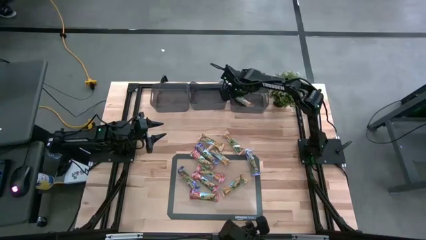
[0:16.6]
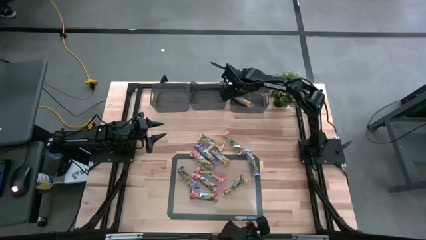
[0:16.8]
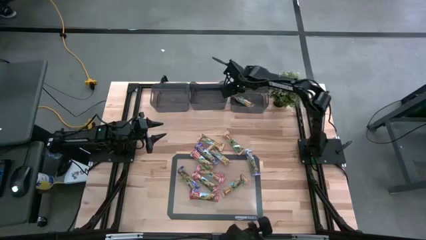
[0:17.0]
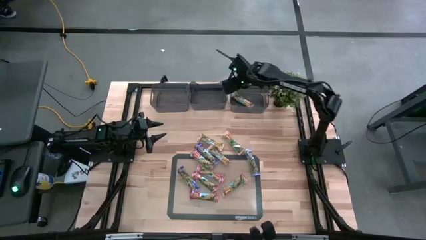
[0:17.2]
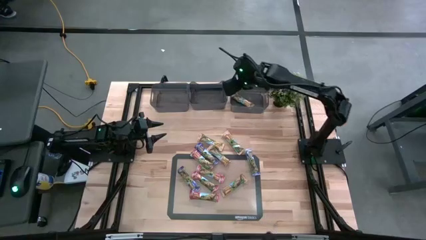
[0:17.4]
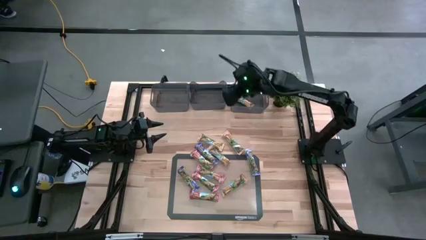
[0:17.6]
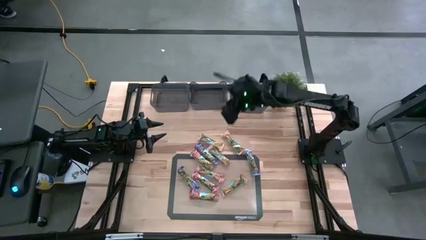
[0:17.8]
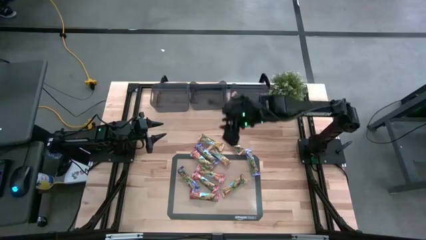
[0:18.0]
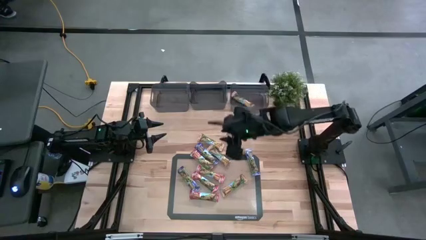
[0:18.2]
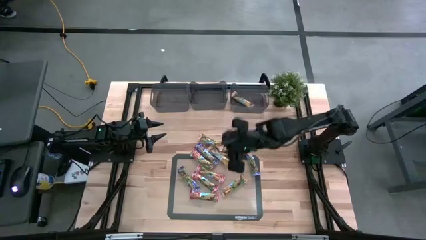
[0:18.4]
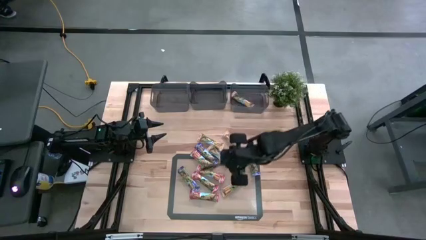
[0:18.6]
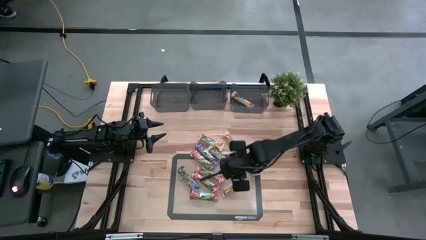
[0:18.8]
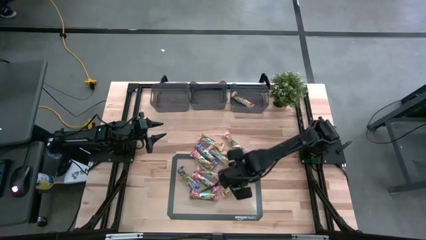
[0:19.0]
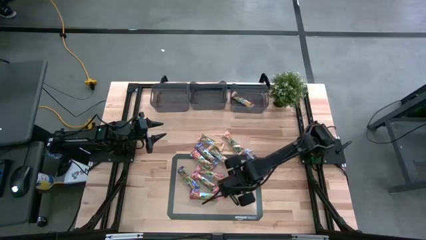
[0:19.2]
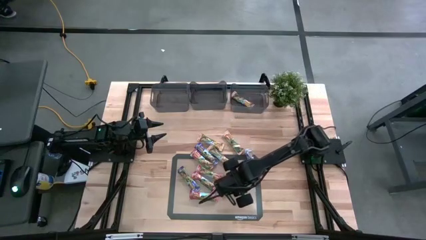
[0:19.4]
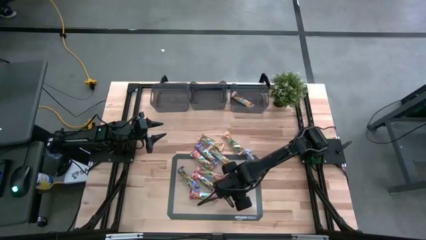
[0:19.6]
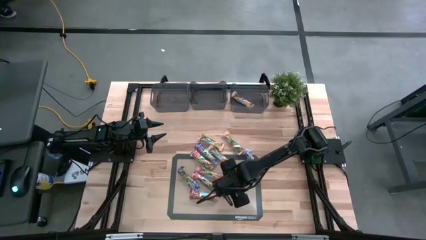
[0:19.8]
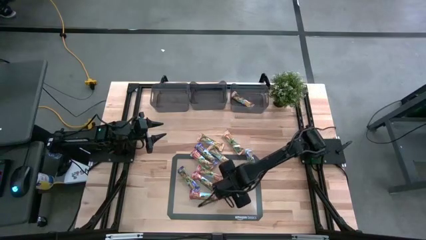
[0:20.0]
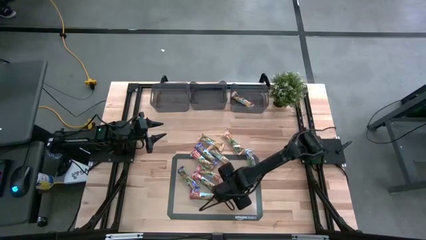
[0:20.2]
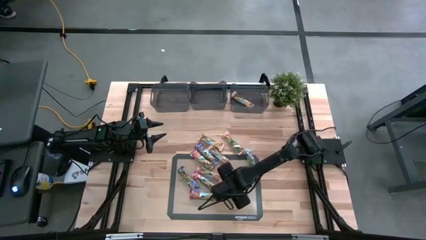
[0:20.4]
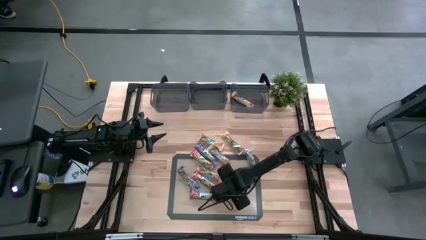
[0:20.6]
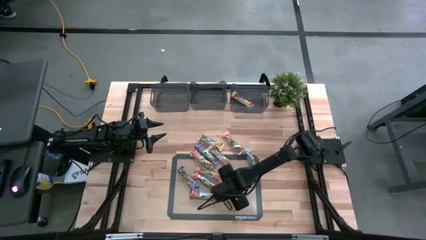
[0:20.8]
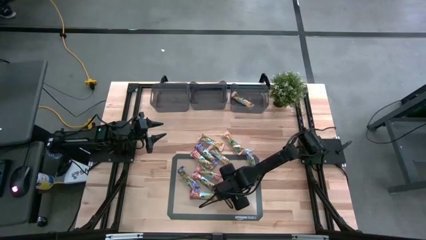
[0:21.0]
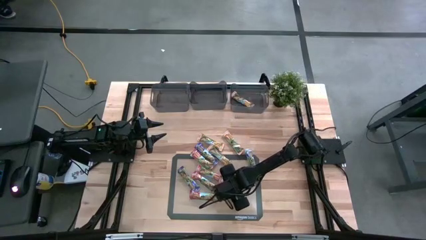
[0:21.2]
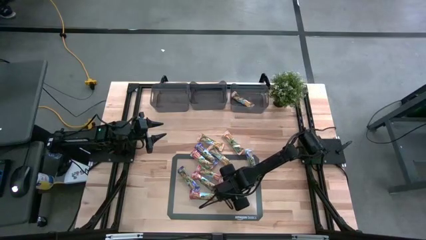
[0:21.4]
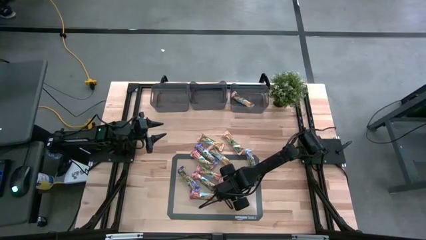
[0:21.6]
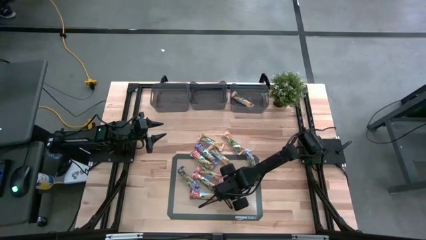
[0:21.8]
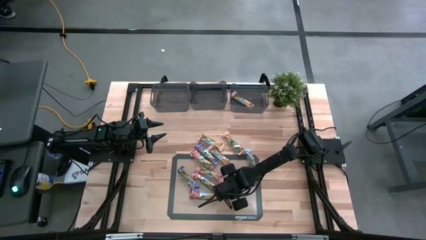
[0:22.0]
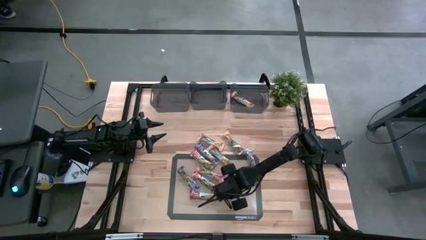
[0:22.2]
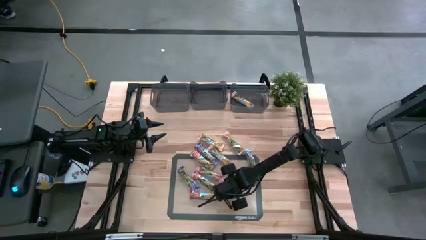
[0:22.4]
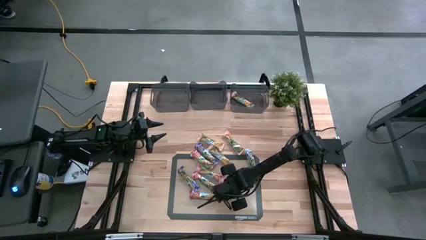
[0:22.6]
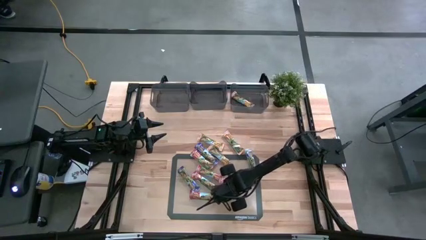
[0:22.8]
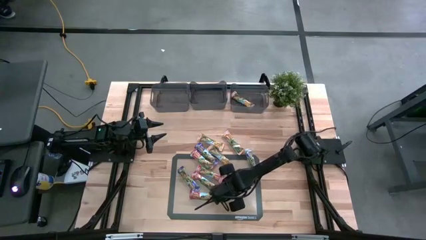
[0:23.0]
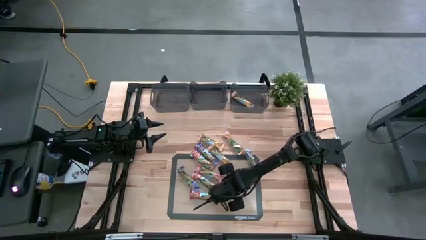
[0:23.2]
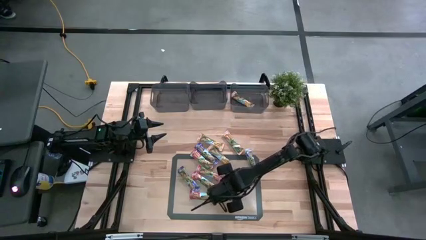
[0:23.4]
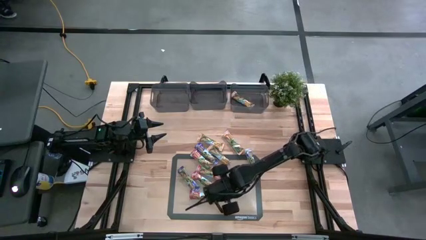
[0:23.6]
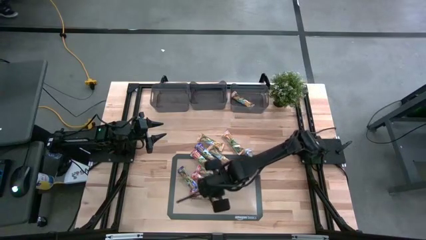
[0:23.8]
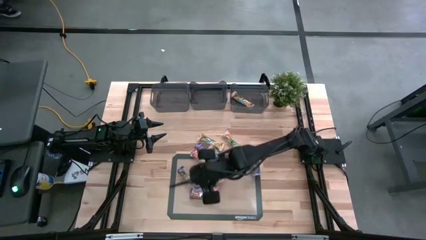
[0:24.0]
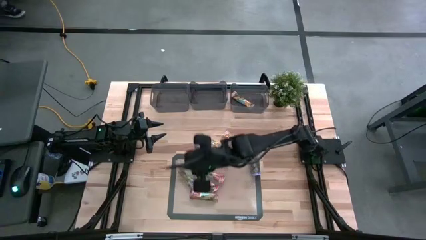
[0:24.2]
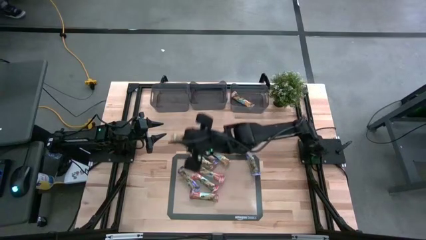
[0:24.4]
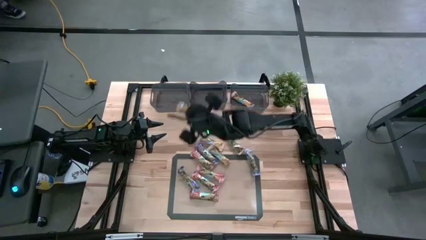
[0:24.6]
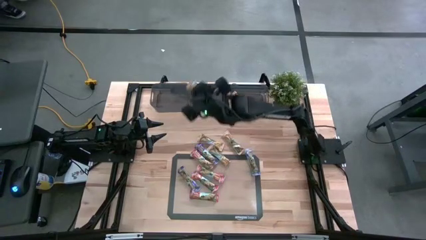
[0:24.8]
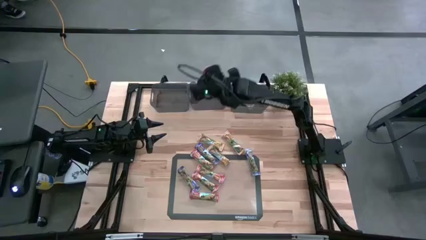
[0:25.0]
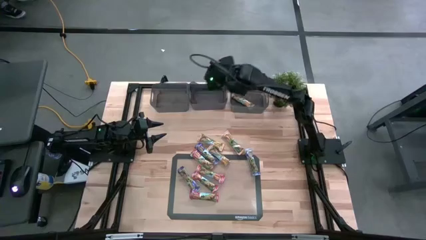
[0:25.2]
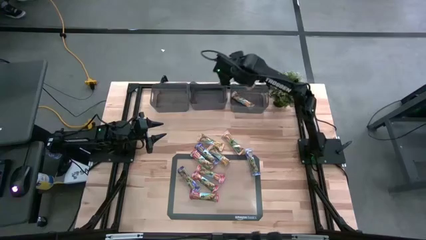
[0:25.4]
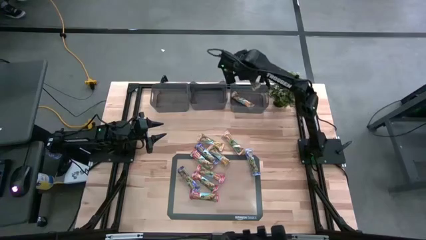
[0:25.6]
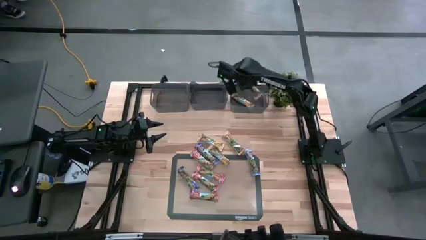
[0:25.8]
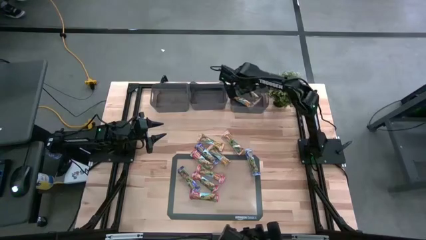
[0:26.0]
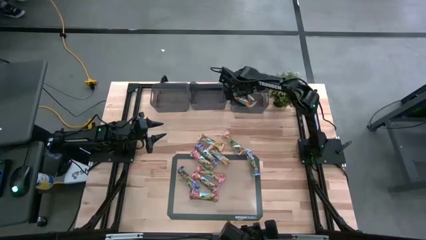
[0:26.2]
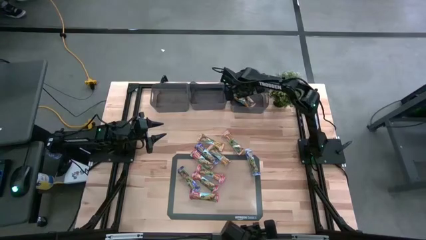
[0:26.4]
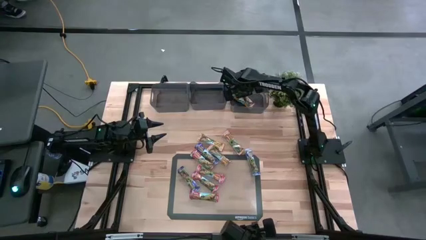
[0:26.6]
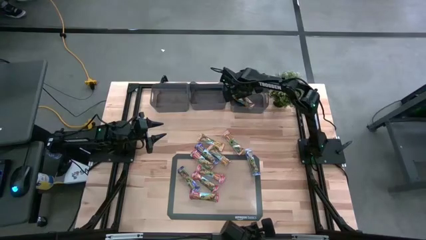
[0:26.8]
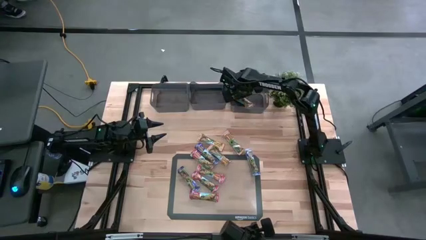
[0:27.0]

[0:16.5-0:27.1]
Task: Pick and place Granola Bars by type
Put the yellow granola bar into the right black bin

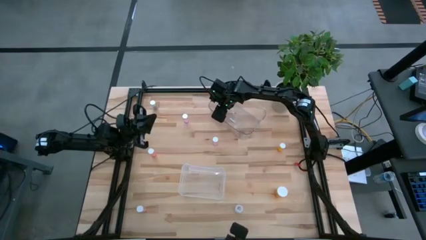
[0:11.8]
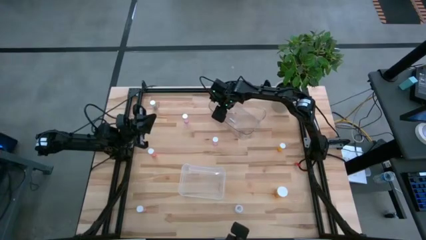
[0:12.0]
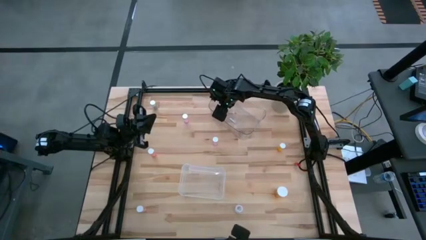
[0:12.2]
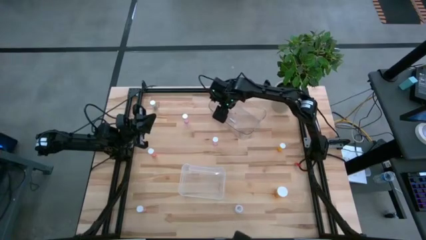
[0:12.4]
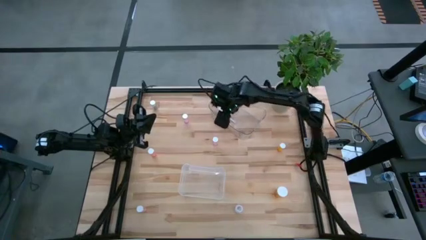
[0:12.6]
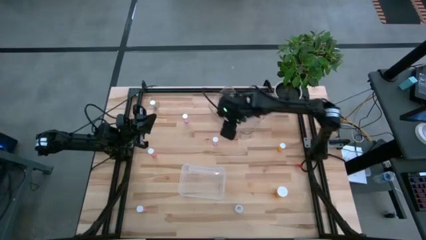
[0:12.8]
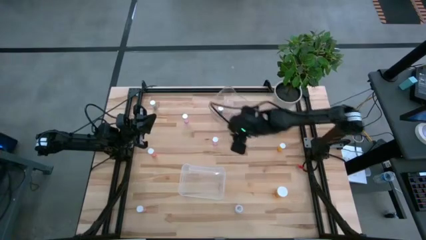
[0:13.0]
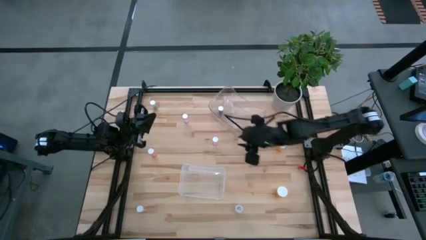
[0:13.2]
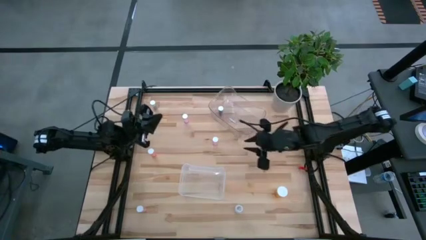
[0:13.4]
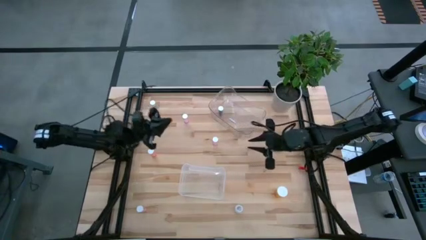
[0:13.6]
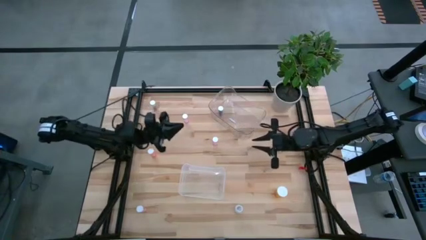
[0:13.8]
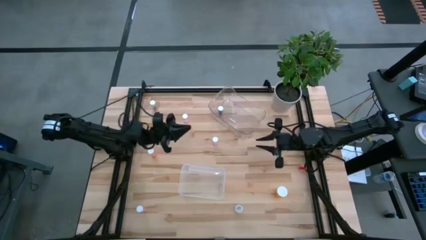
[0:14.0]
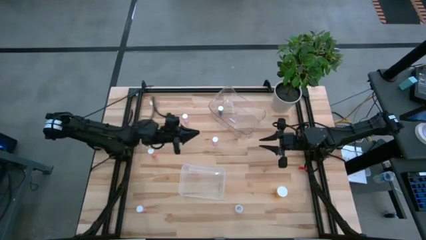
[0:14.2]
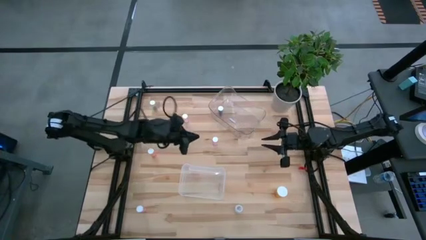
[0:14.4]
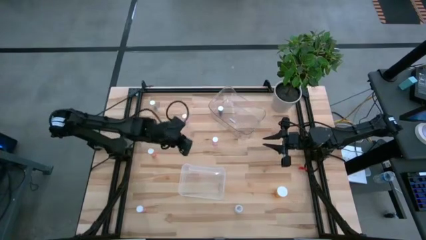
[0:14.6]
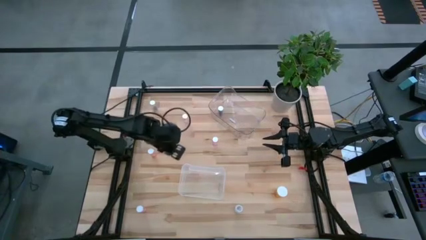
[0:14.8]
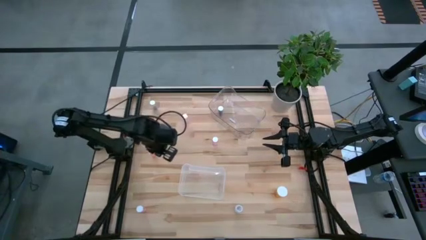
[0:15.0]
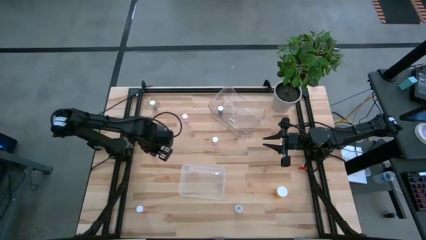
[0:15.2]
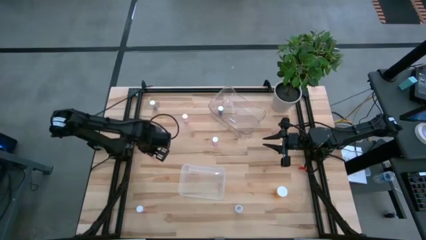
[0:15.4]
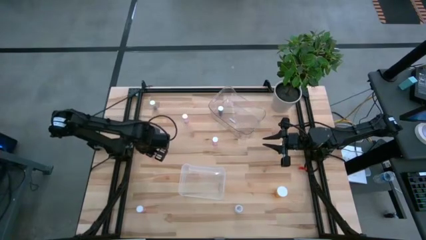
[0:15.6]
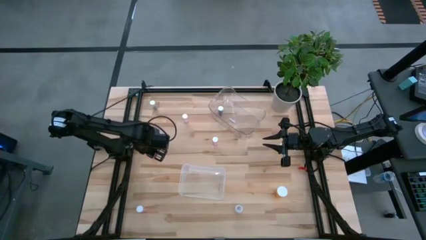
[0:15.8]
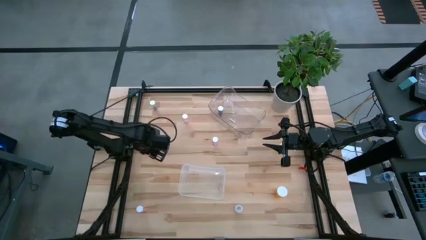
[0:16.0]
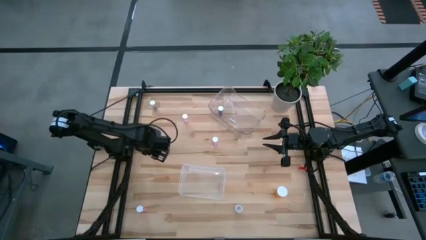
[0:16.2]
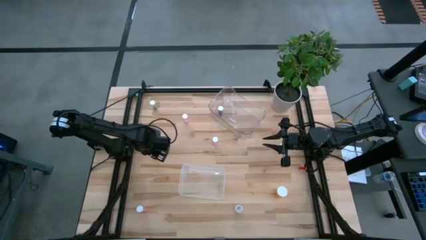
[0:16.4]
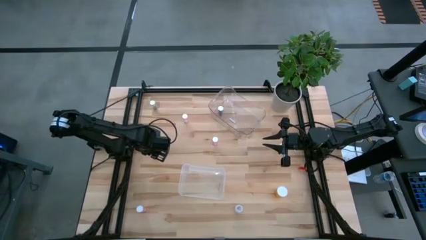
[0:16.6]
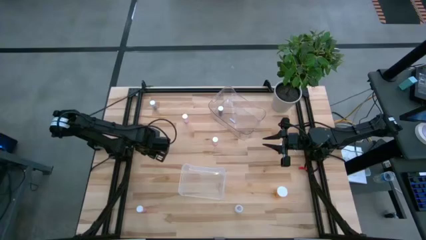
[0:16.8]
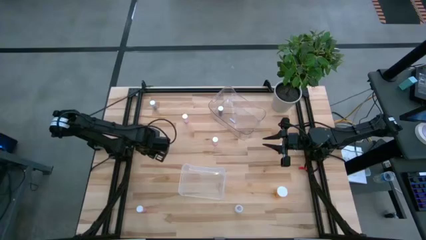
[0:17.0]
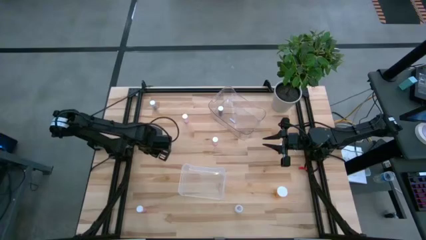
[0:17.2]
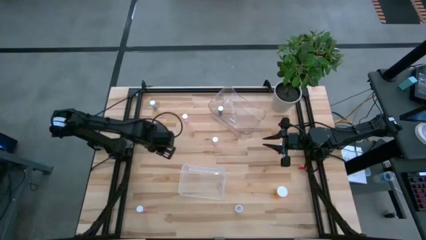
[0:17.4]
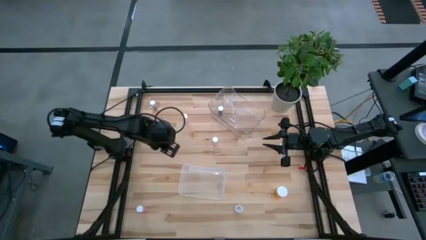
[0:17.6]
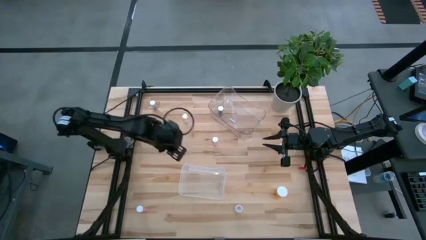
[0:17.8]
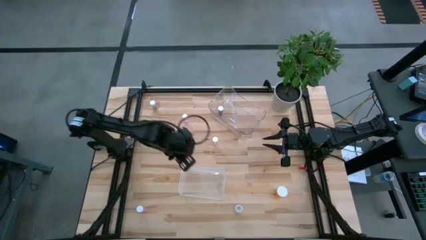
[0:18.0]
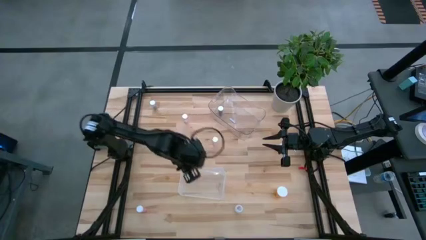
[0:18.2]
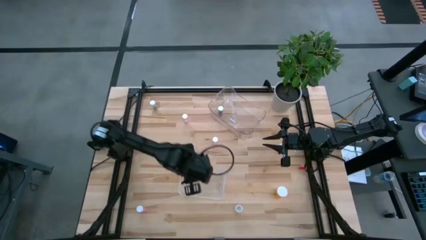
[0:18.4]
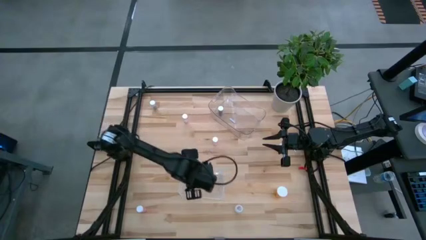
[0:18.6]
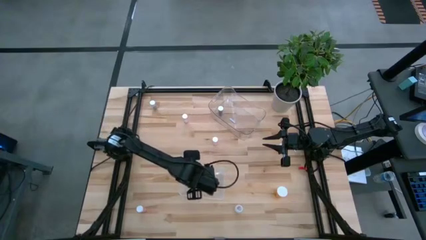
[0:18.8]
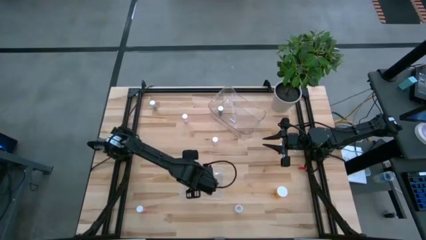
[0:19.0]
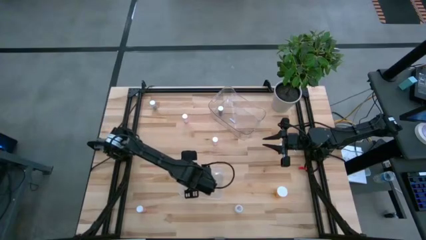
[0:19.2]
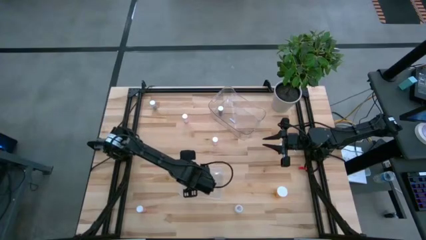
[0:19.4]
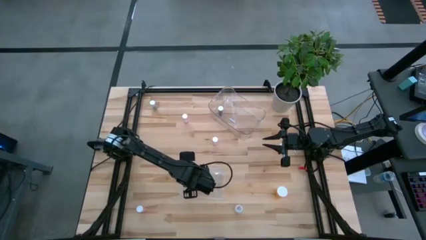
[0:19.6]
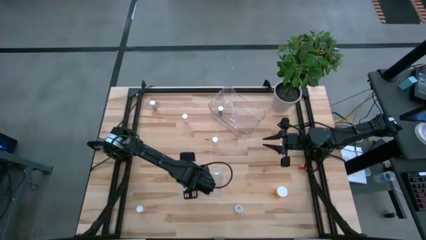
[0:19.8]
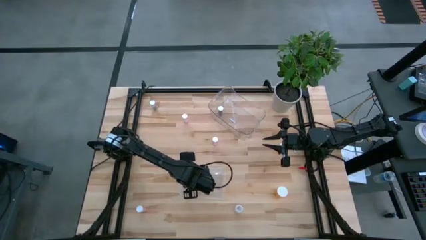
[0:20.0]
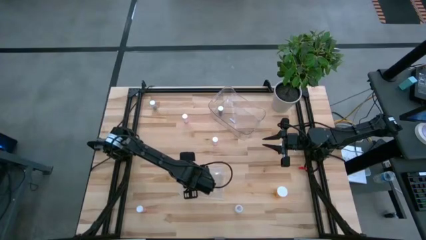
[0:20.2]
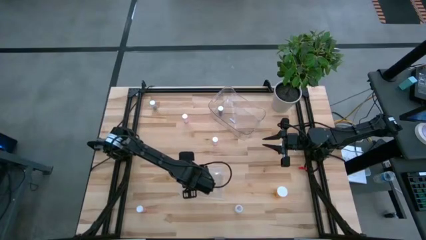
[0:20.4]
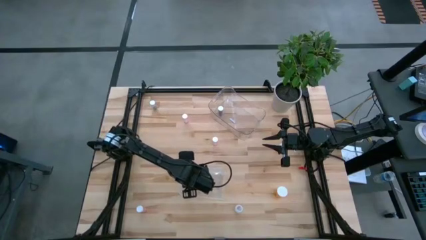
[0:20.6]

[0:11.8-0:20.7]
Task: Pick and place medicine bottles into bin by pill shape (circle, oval)
Put the pink tablet bottle into the bottom transparent bin
